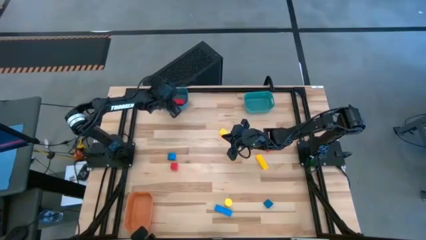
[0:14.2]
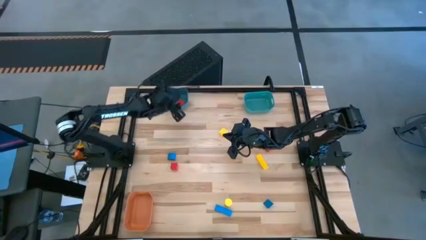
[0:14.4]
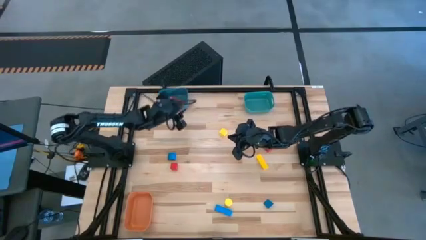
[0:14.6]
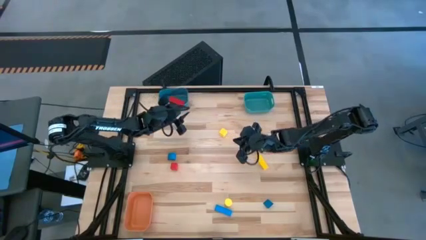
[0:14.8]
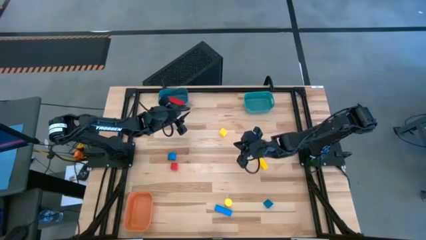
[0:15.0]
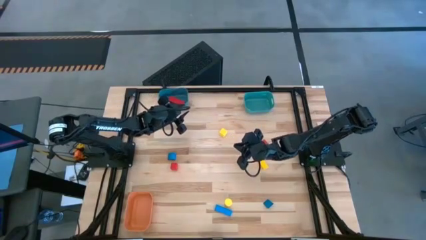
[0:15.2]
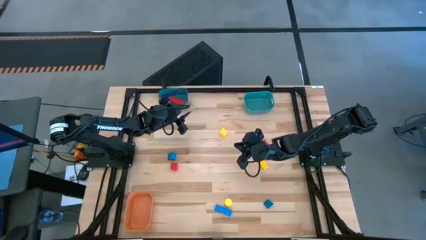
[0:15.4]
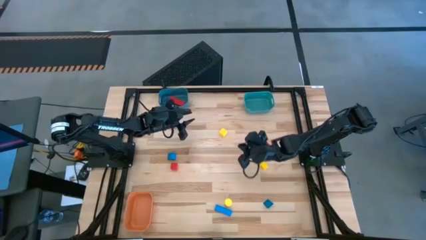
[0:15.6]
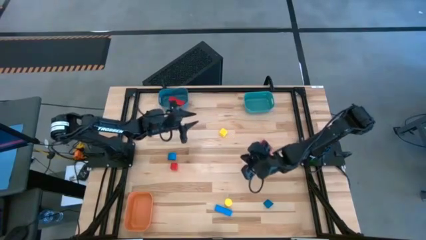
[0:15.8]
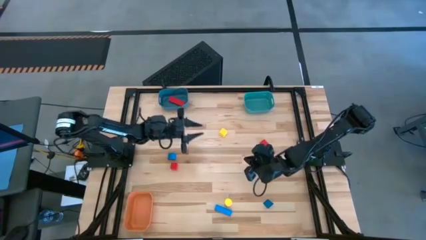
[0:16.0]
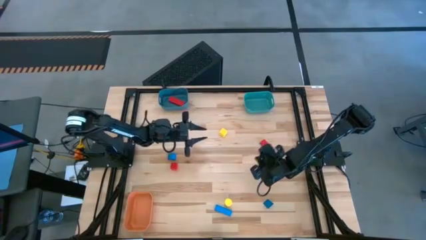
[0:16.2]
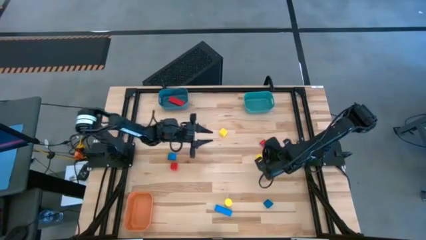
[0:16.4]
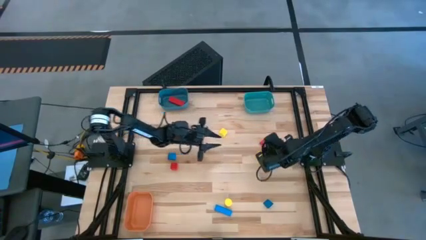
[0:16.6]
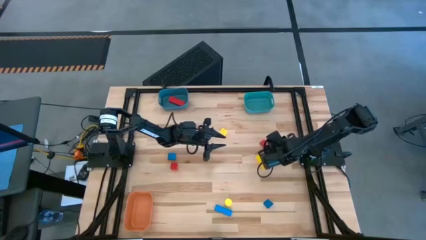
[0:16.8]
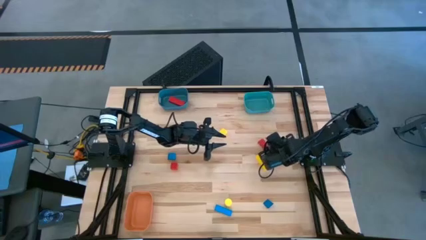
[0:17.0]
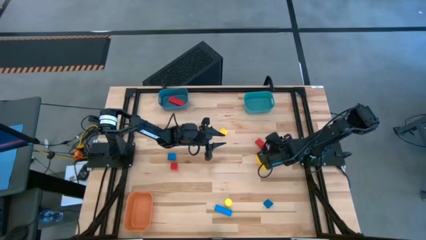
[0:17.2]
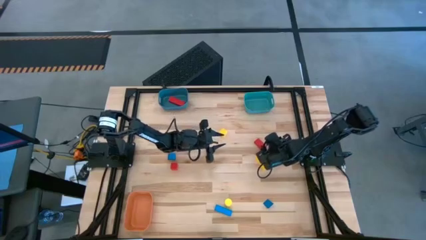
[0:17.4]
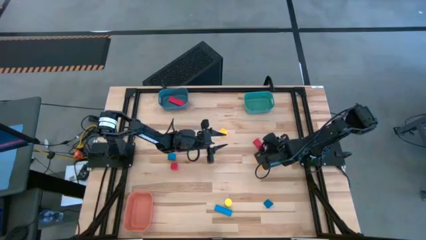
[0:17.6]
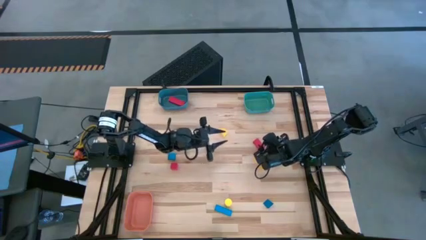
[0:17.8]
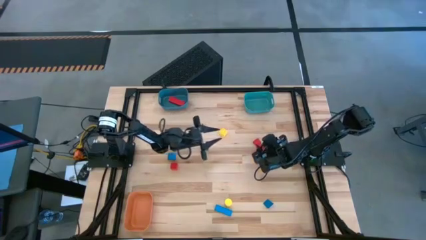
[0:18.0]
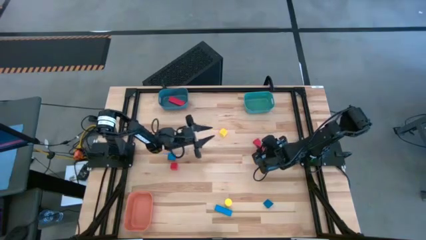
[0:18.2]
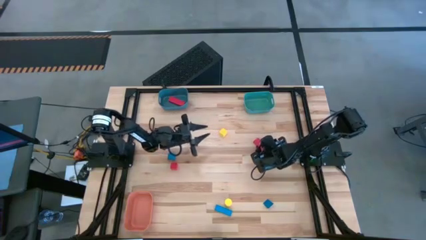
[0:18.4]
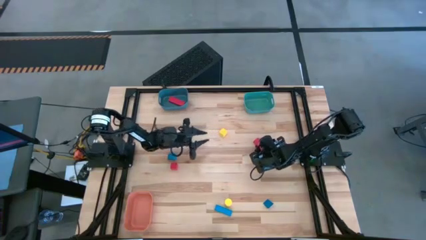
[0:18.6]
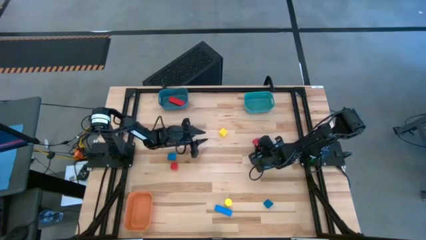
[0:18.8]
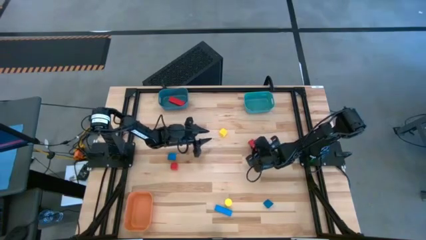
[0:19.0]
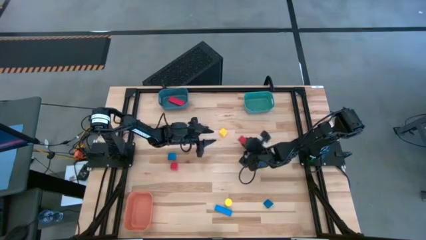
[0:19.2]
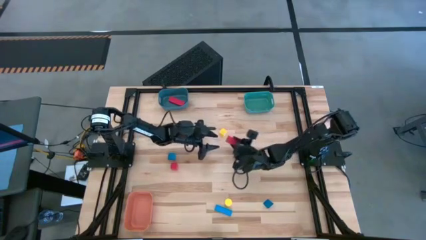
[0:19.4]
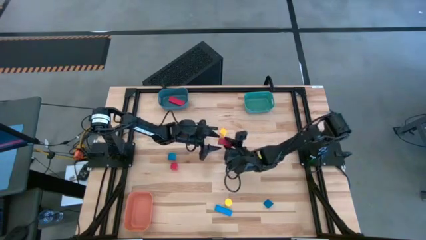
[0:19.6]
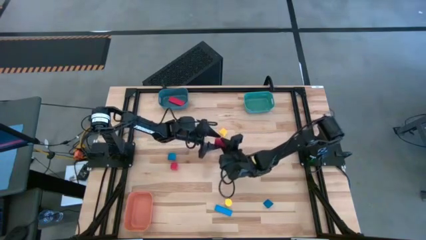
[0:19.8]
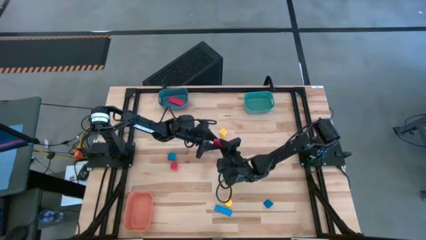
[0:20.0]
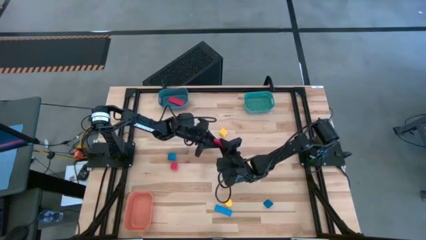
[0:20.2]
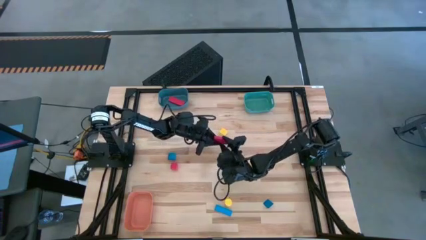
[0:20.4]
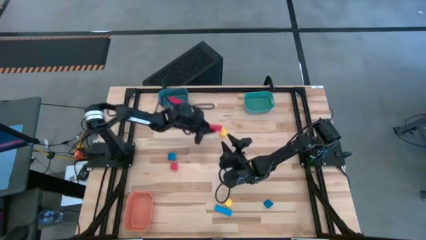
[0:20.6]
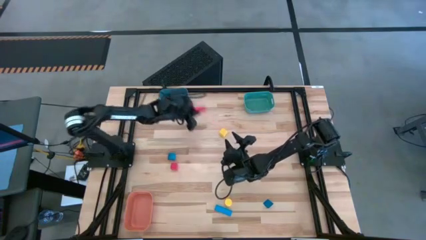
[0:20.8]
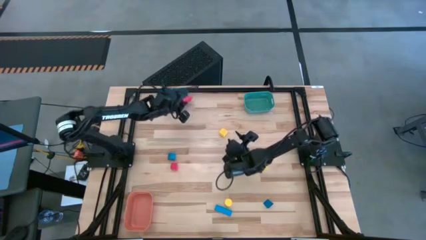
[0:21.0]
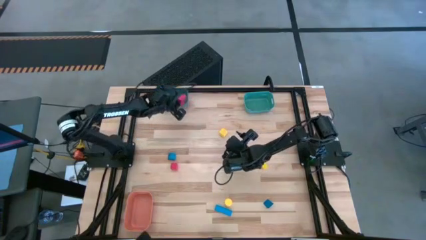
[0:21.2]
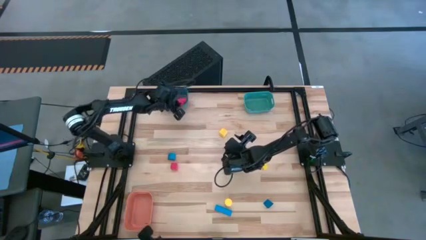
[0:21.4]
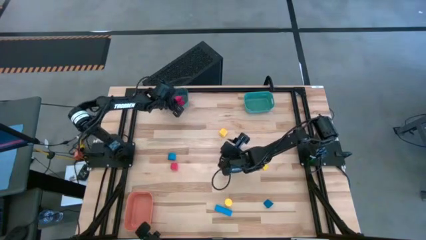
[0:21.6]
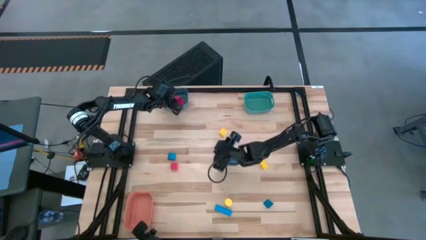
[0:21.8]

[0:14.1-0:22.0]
Task: Sort & place blocks by color
Put the top red block into the blue bin

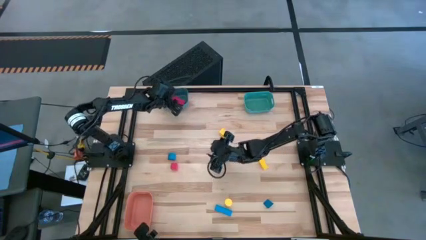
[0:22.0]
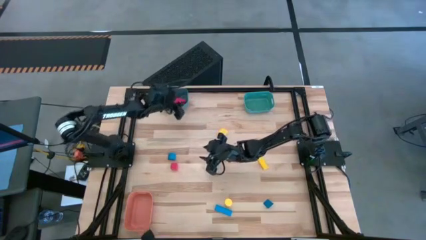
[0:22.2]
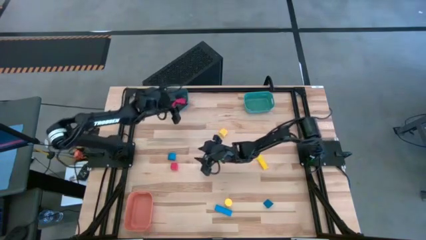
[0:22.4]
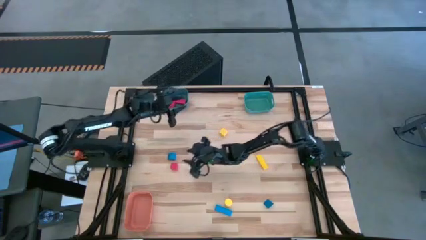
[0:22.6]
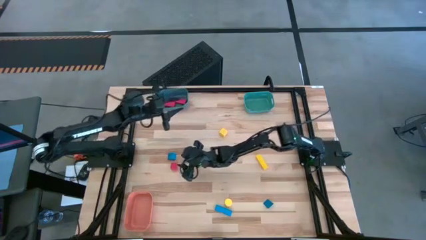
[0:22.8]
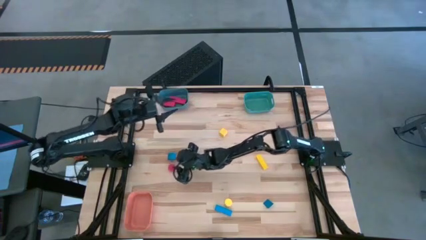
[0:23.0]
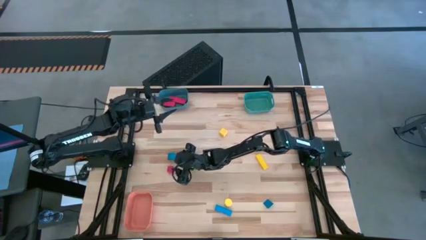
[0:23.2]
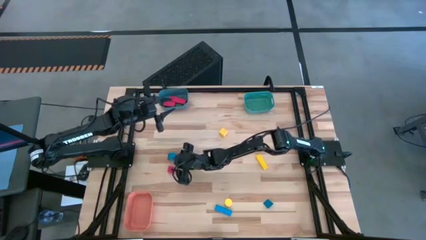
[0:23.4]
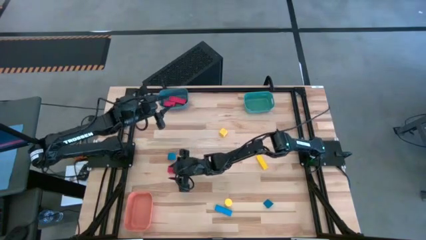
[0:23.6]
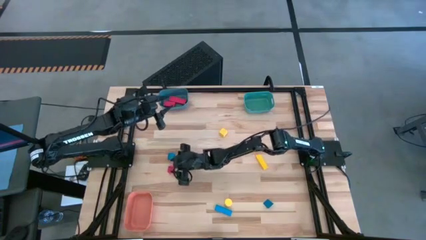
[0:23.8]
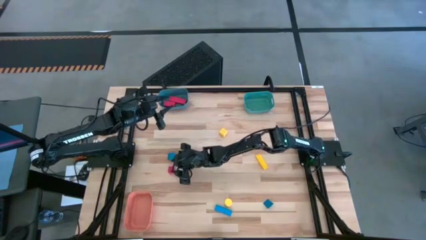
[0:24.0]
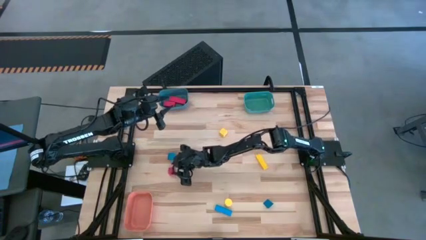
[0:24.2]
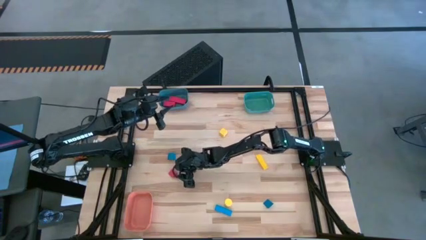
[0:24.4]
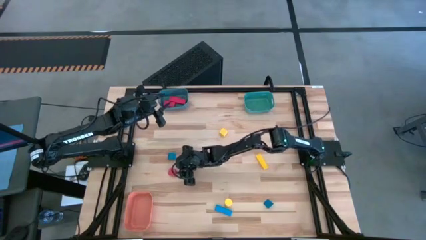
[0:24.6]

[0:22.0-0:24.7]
Put the red block into the blue bin

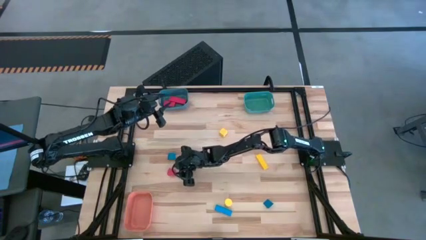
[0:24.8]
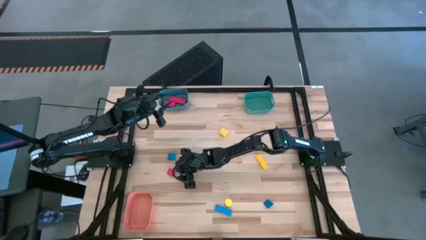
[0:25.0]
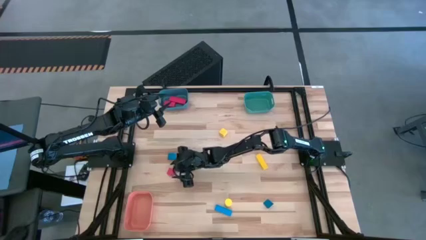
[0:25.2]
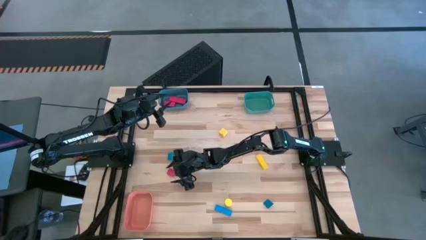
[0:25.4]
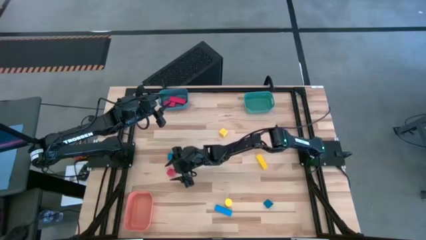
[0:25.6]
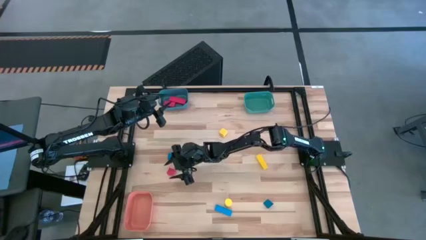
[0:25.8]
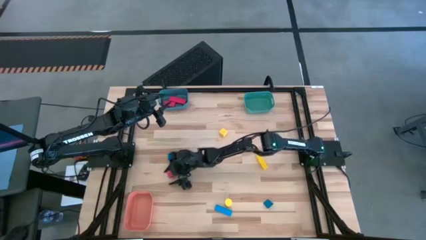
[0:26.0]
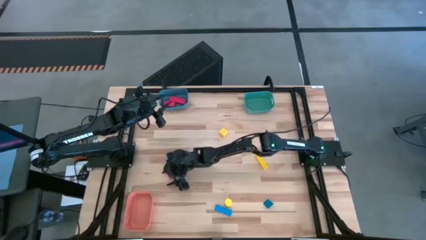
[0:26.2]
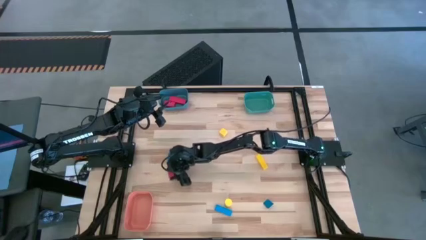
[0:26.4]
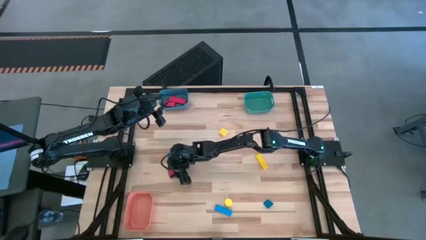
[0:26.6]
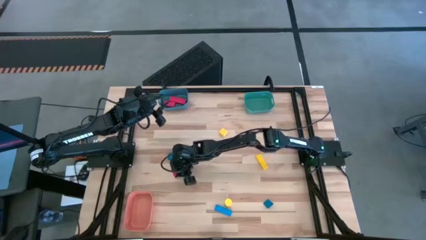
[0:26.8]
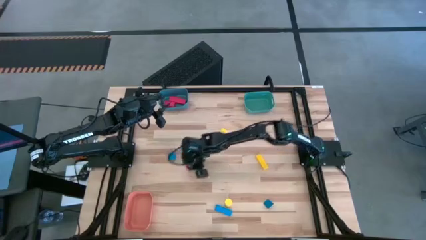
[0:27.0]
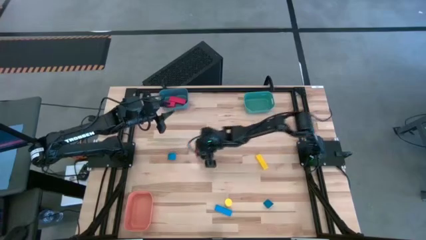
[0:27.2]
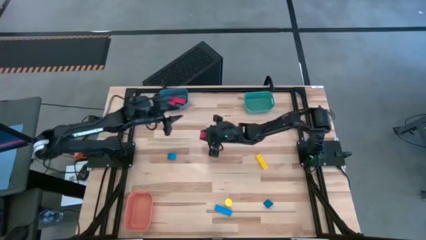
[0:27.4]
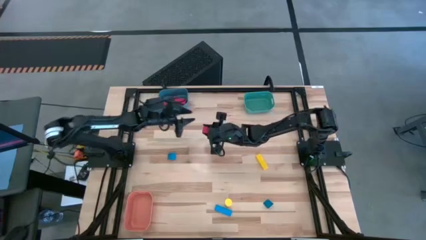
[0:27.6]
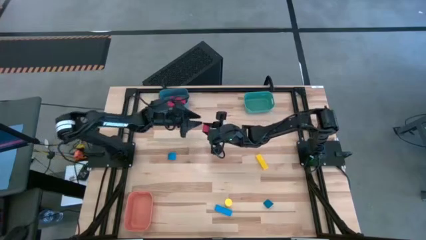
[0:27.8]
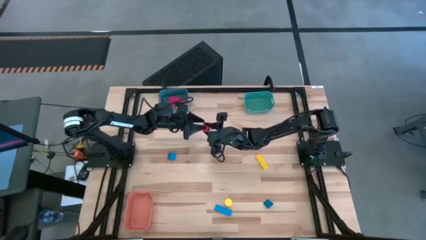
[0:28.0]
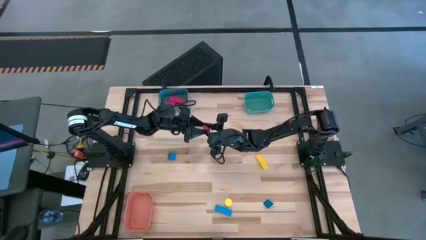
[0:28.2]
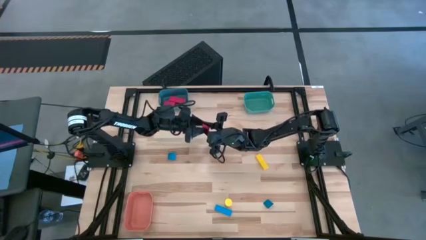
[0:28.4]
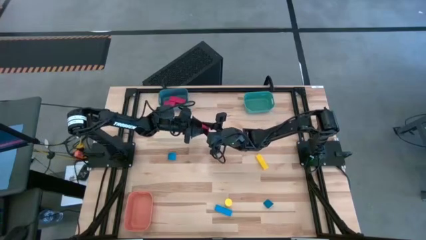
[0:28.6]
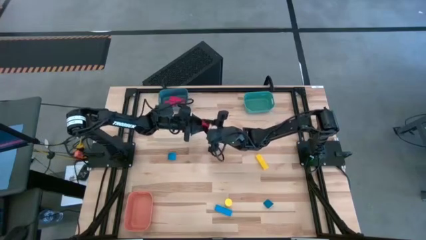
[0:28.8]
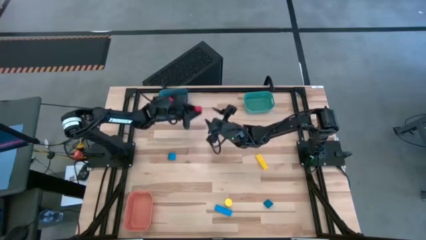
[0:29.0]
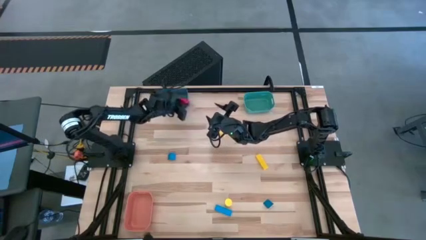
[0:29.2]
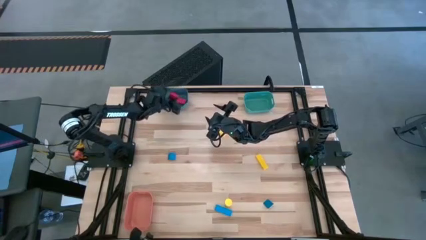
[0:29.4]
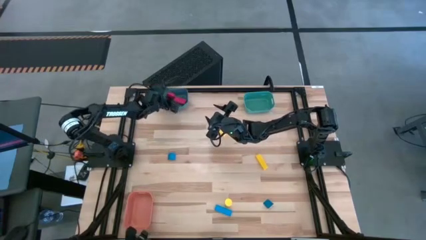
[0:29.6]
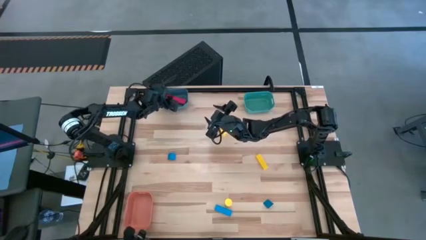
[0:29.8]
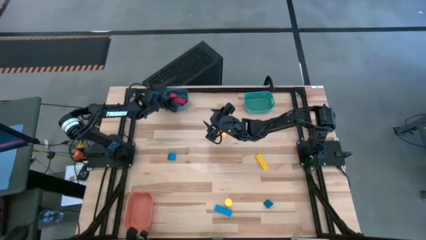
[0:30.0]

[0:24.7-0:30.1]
Put the red block into the blue bin
